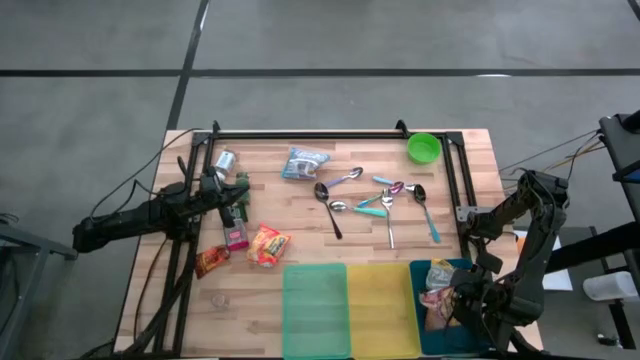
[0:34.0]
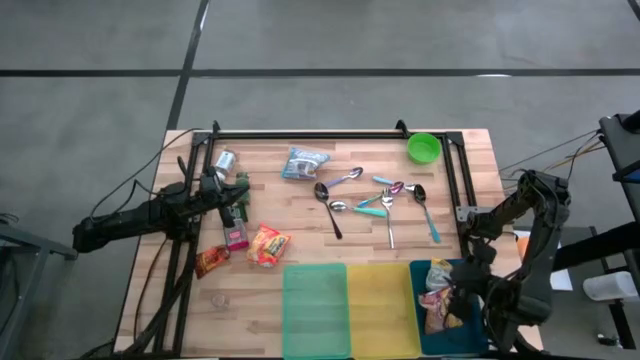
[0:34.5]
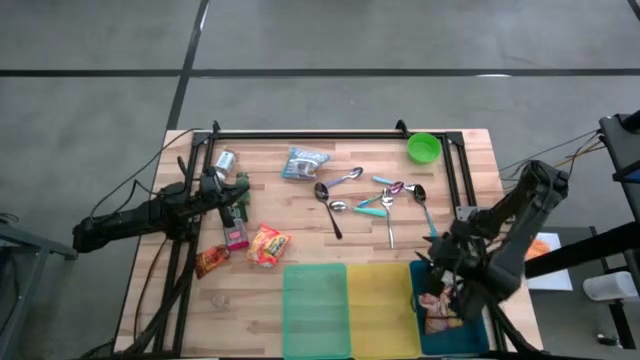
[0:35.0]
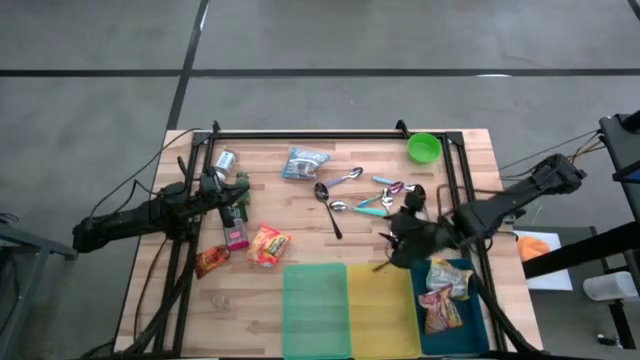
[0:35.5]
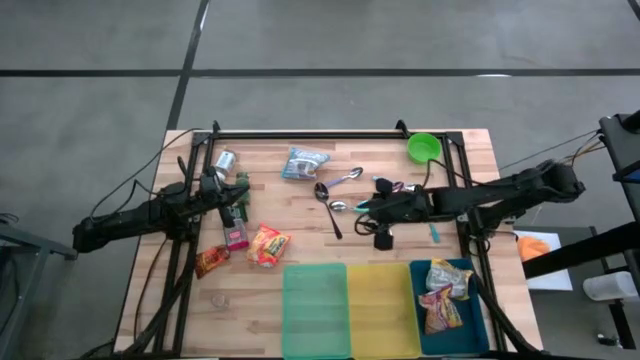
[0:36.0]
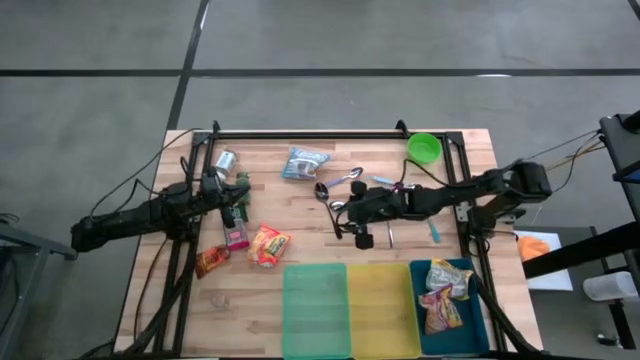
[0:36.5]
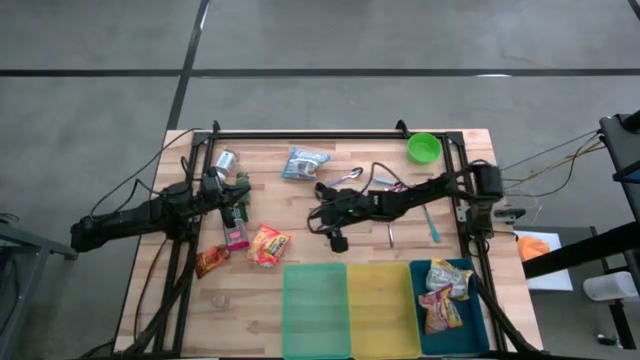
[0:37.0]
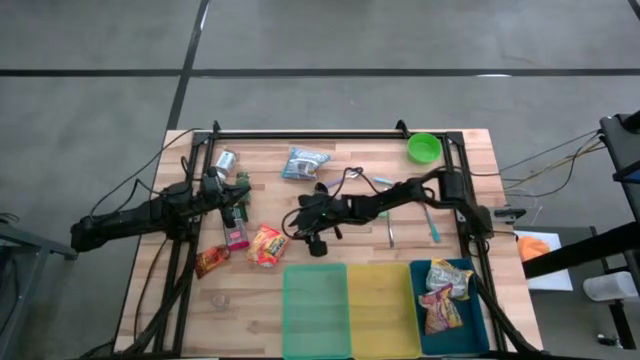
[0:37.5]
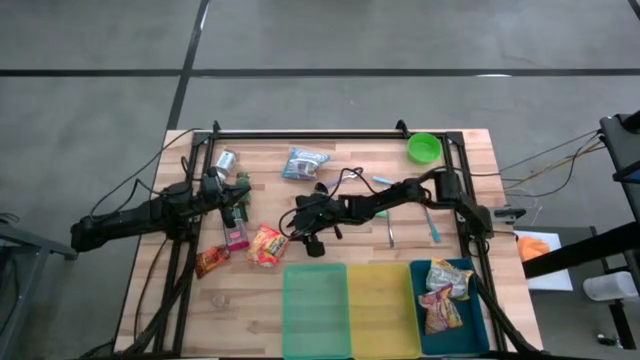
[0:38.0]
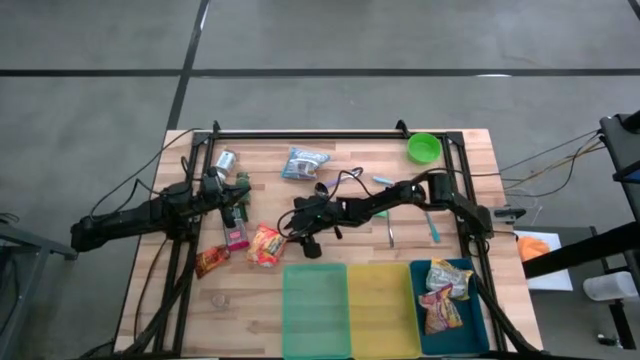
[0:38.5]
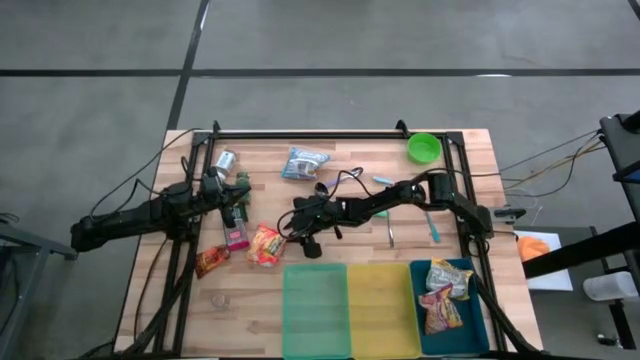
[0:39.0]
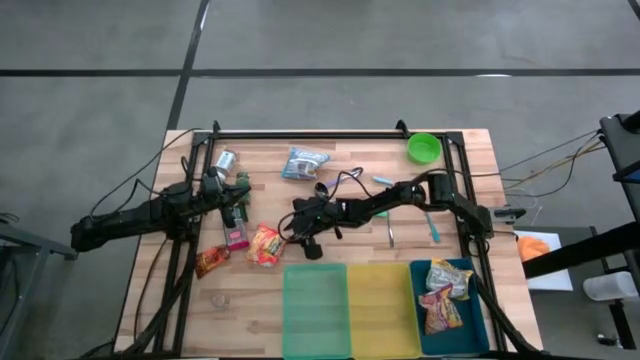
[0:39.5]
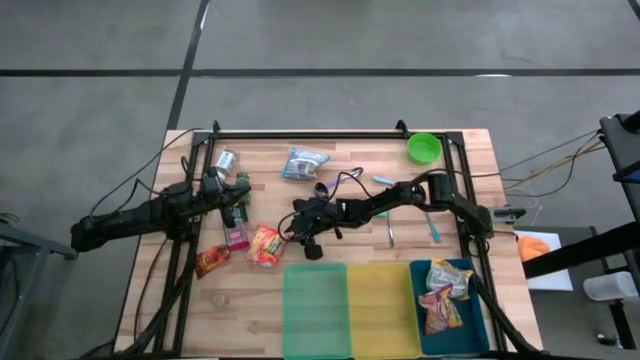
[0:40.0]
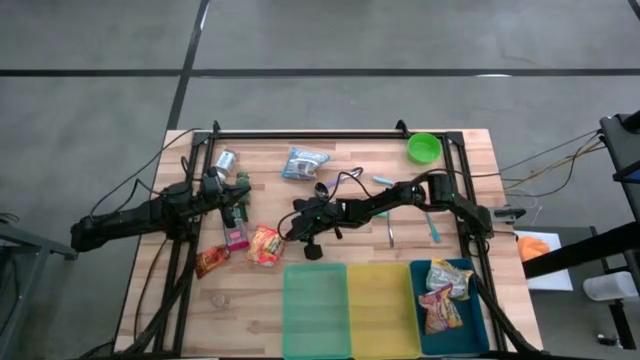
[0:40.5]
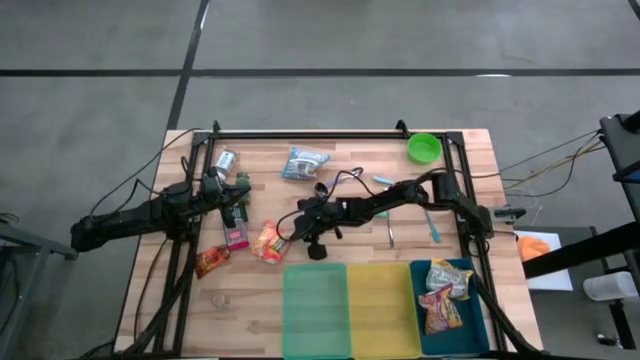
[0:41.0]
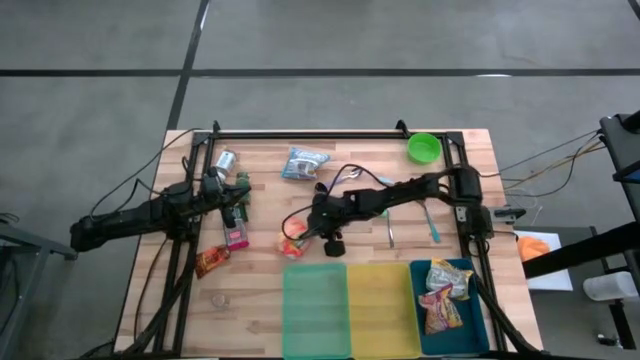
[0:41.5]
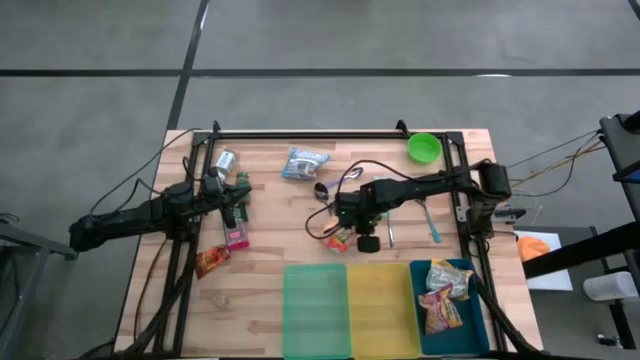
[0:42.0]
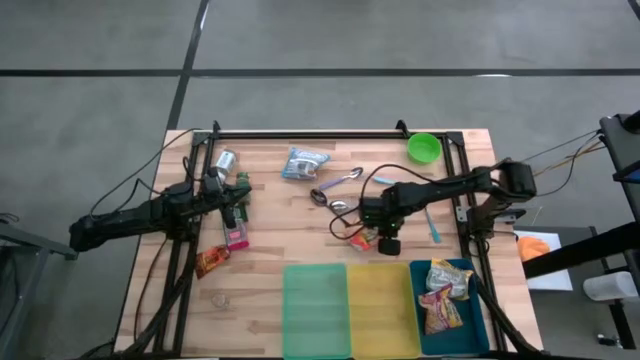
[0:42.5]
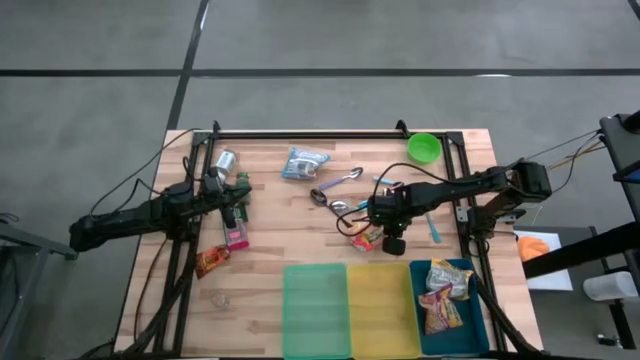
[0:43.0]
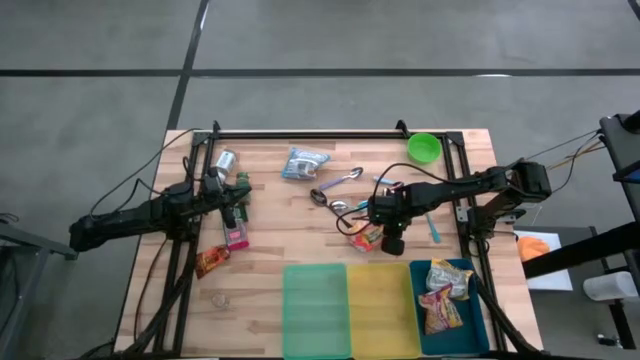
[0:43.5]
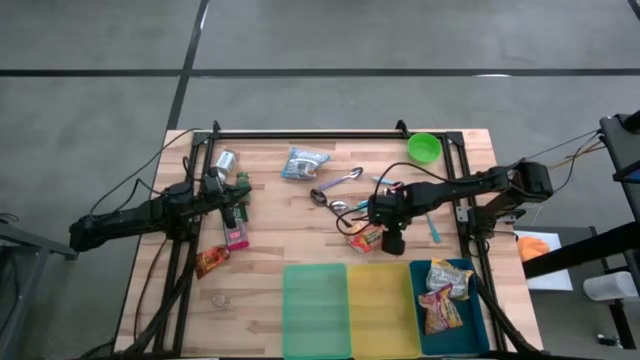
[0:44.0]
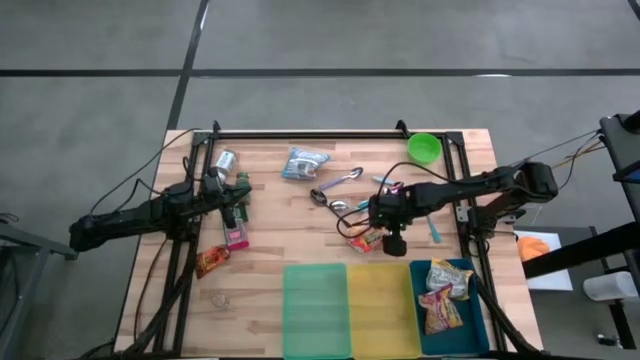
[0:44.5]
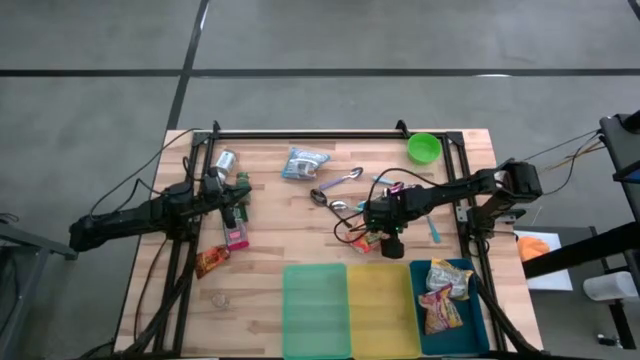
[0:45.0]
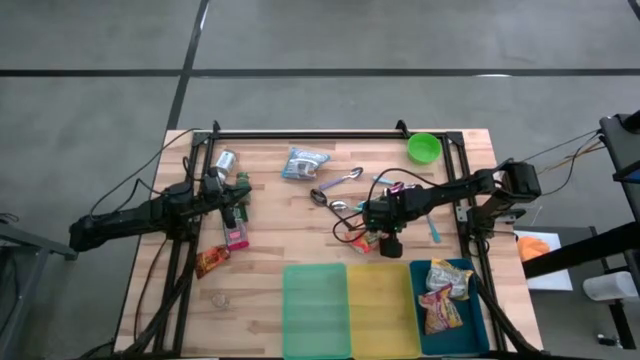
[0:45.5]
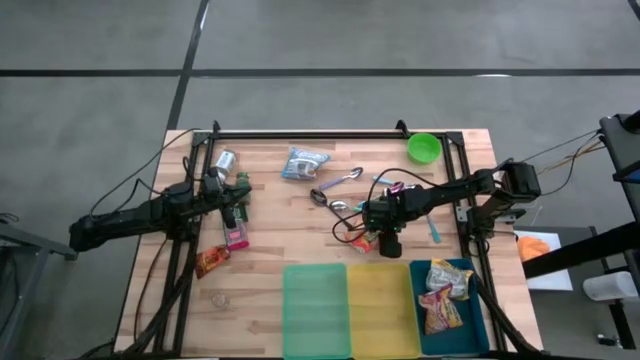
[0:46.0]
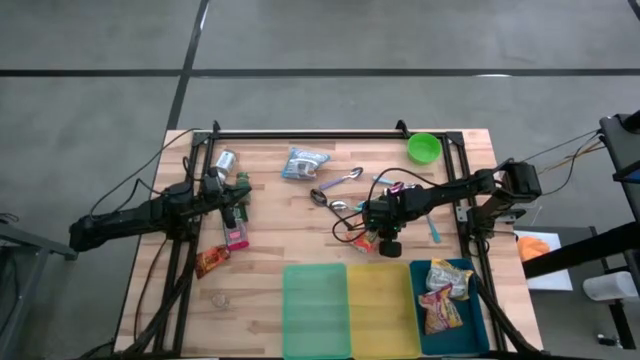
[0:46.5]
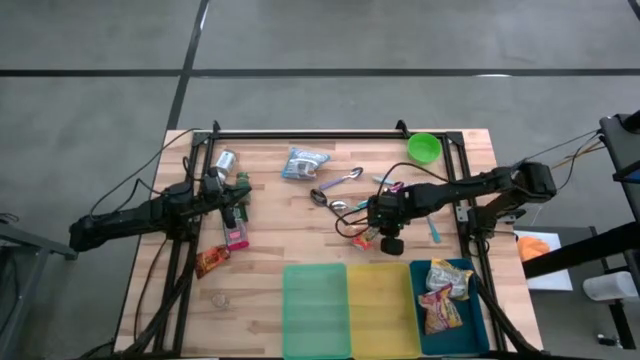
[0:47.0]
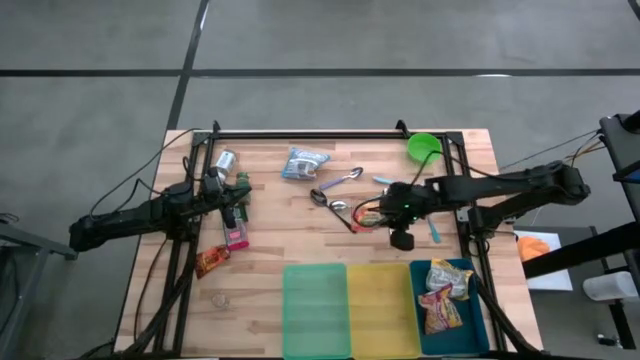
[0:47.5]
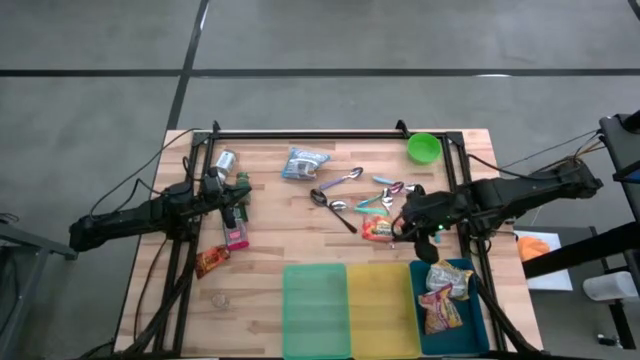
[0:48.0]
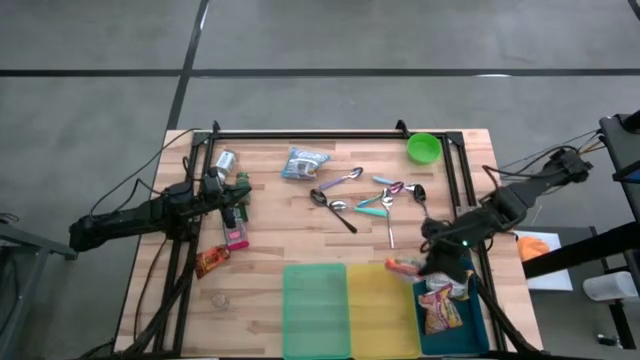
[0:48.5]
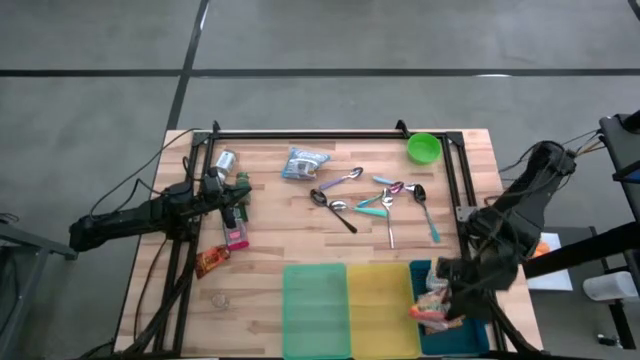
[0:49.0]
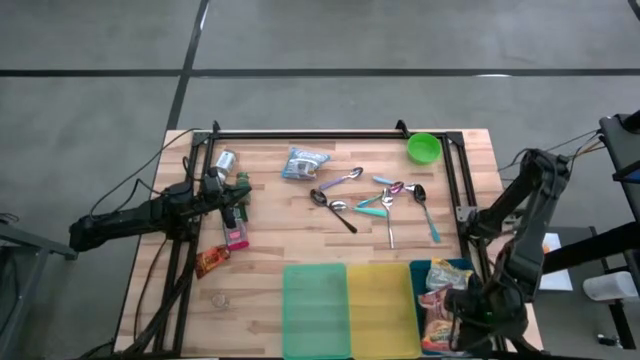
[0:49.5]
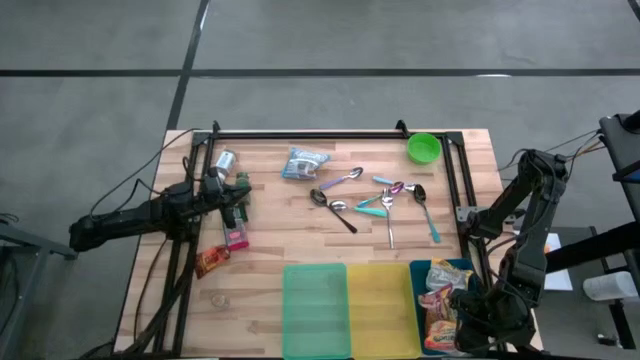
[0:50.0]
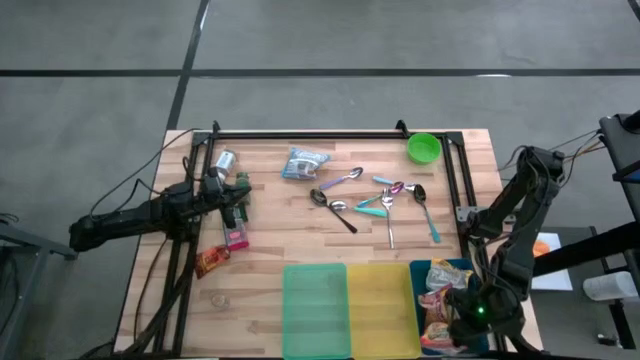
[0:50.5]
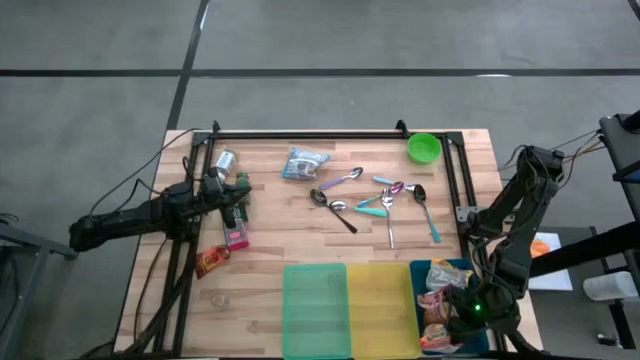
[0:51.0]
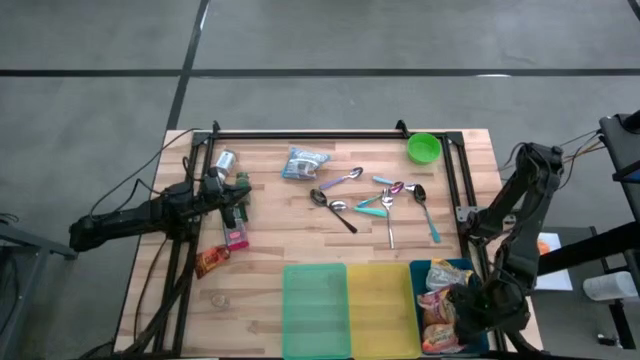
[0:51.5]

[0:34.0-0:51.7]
Put the orange noodle pack into the blue bin
